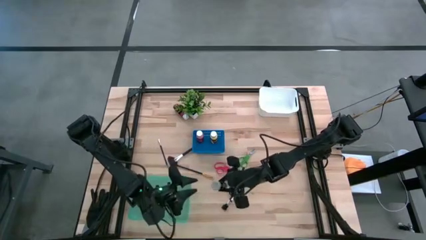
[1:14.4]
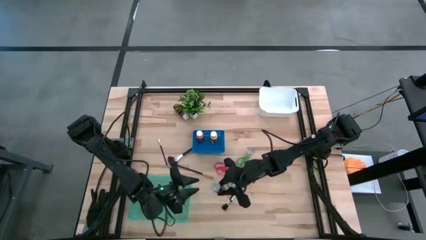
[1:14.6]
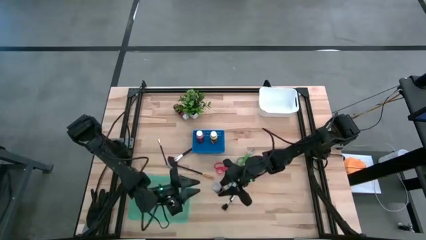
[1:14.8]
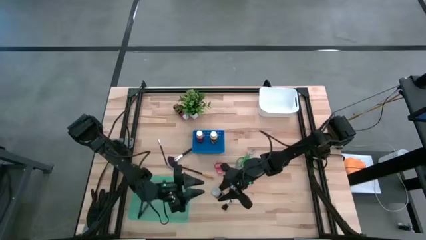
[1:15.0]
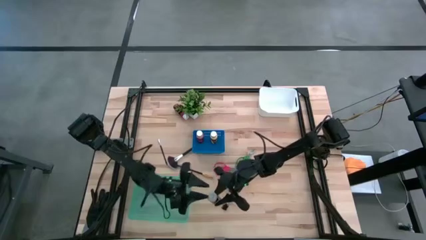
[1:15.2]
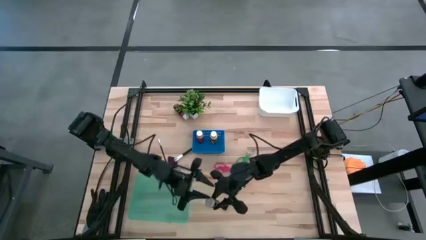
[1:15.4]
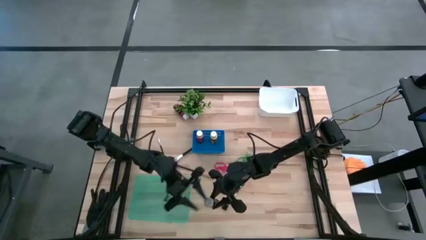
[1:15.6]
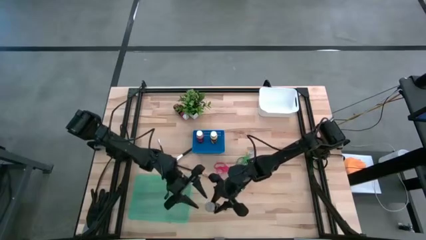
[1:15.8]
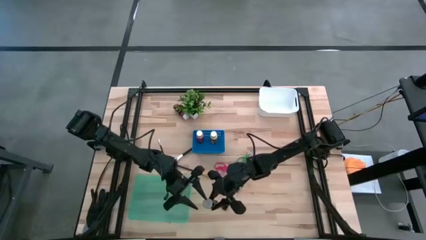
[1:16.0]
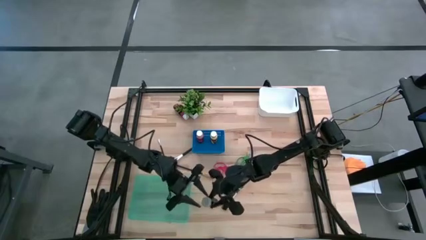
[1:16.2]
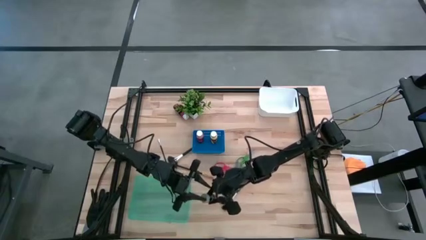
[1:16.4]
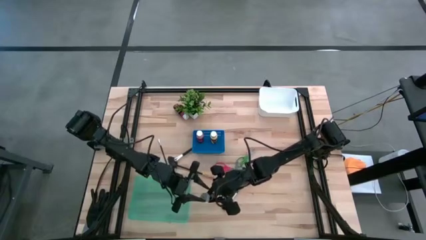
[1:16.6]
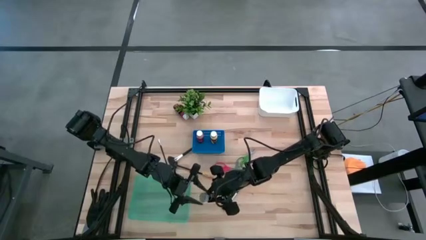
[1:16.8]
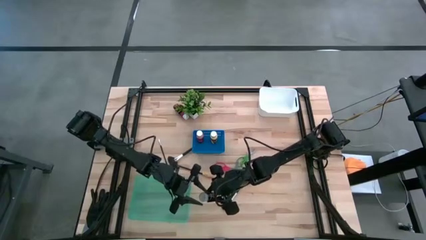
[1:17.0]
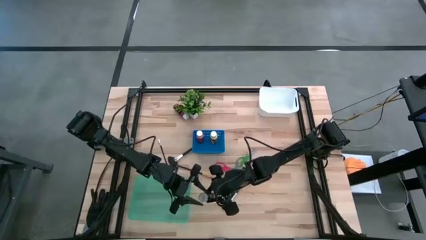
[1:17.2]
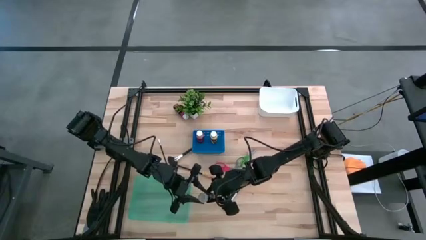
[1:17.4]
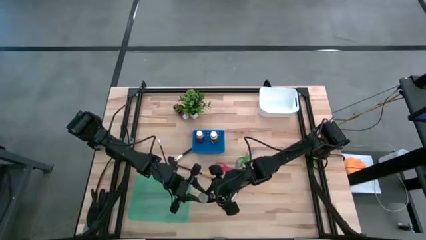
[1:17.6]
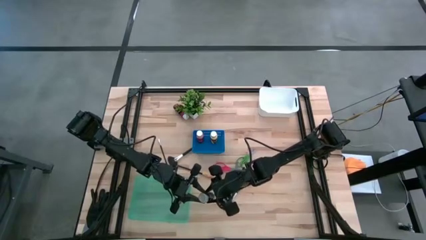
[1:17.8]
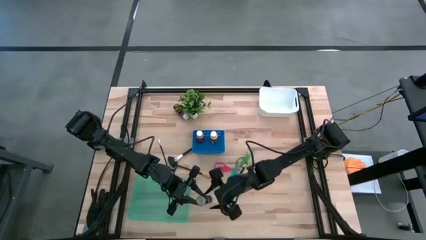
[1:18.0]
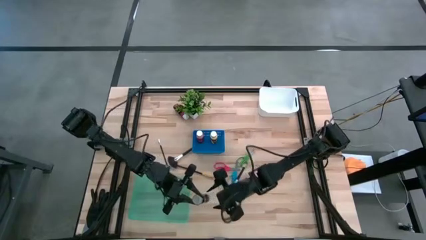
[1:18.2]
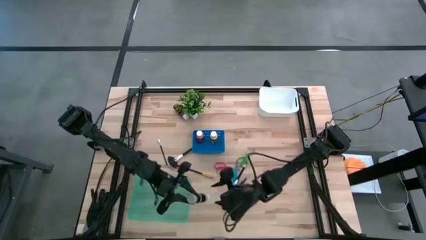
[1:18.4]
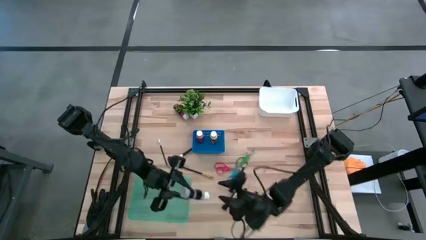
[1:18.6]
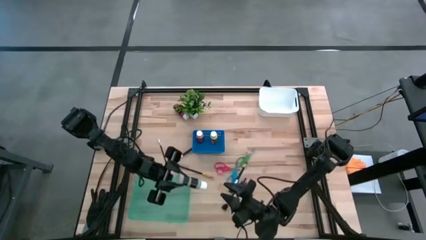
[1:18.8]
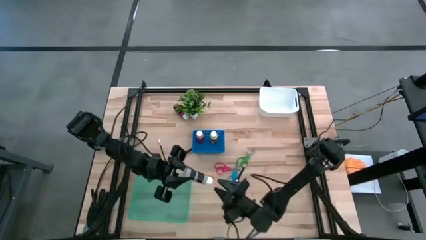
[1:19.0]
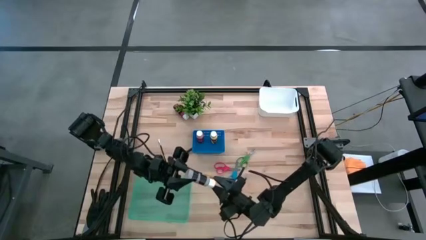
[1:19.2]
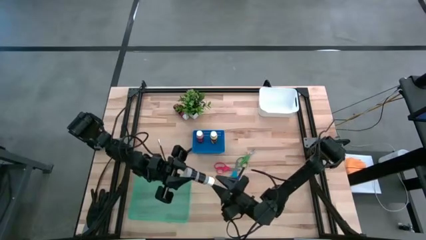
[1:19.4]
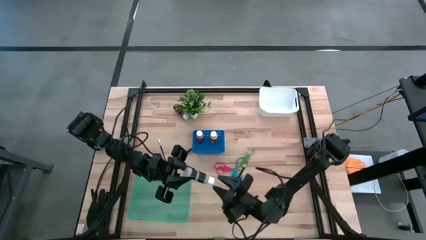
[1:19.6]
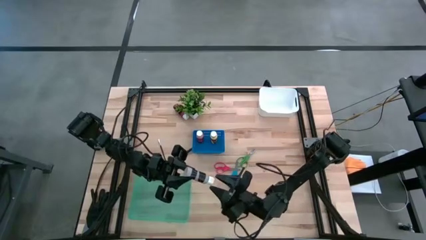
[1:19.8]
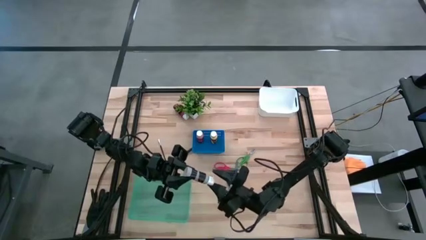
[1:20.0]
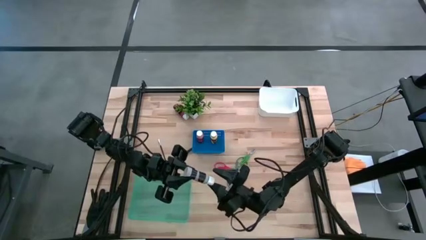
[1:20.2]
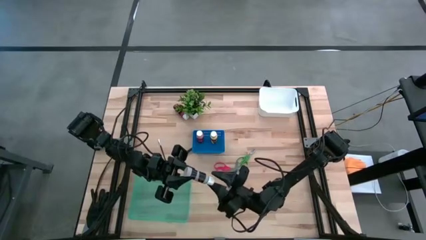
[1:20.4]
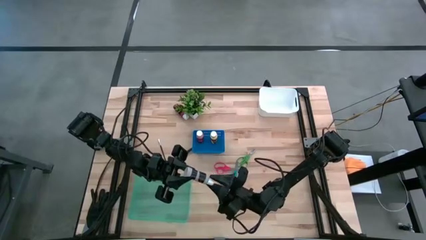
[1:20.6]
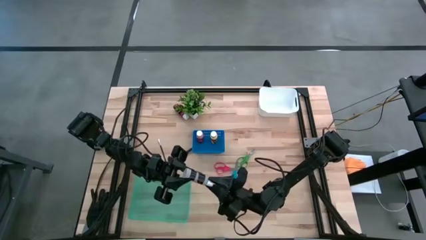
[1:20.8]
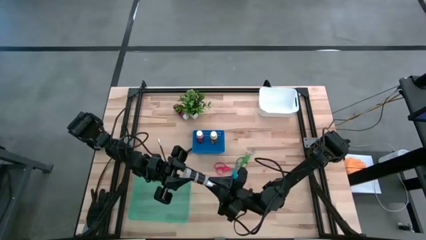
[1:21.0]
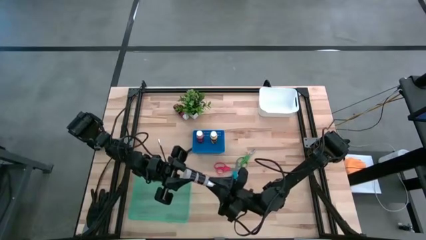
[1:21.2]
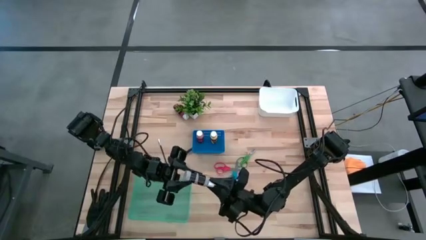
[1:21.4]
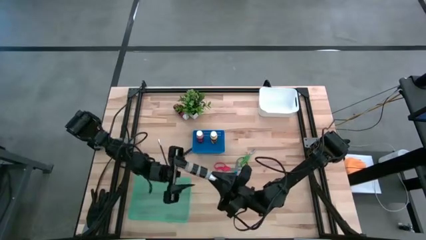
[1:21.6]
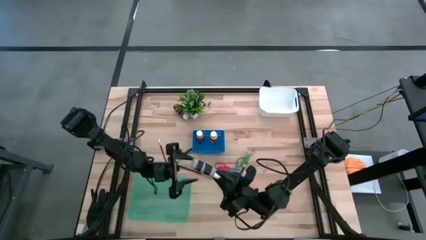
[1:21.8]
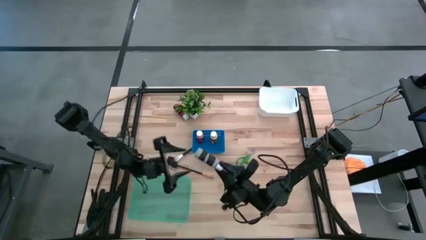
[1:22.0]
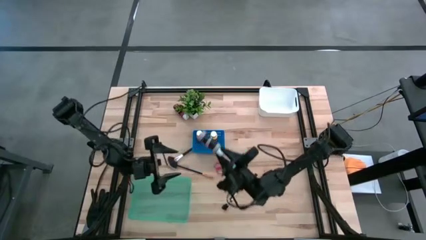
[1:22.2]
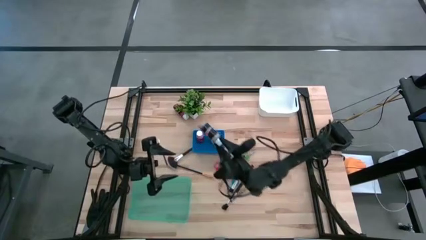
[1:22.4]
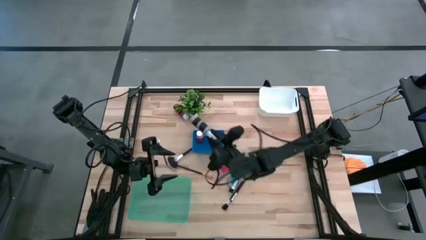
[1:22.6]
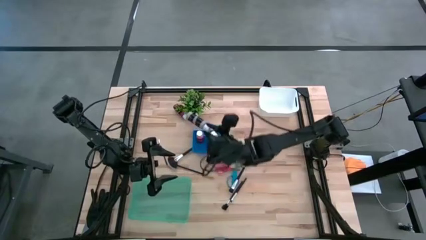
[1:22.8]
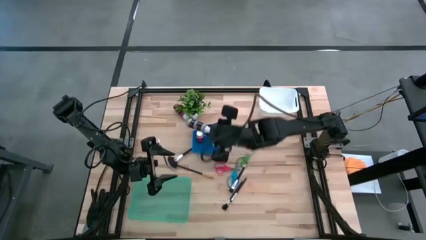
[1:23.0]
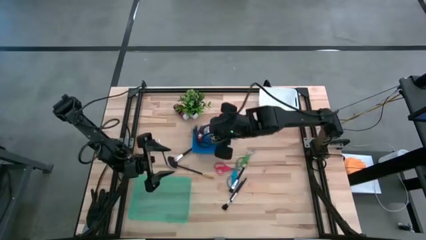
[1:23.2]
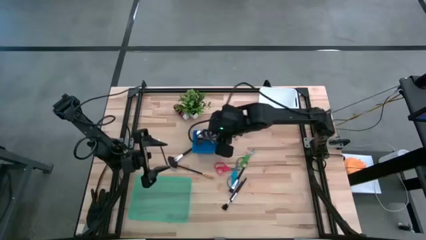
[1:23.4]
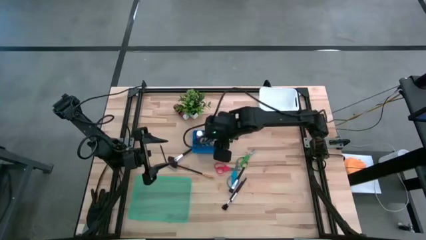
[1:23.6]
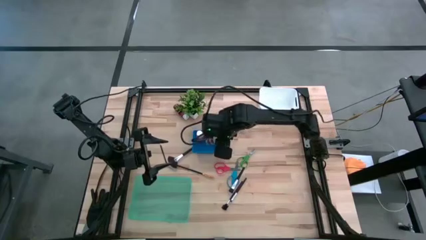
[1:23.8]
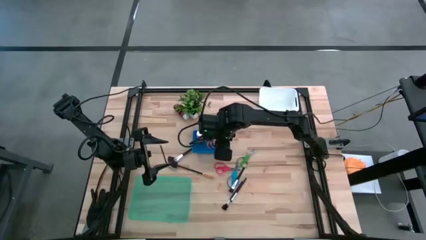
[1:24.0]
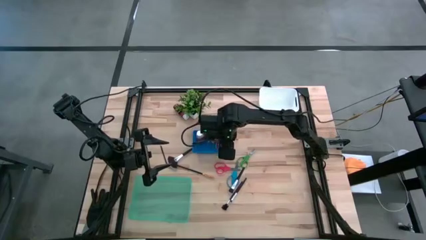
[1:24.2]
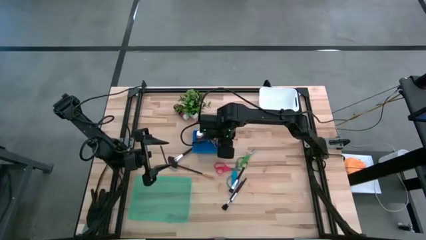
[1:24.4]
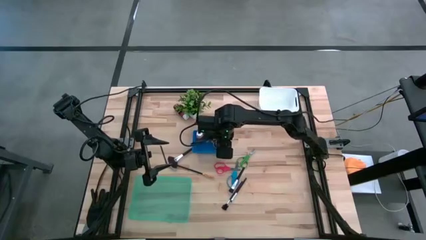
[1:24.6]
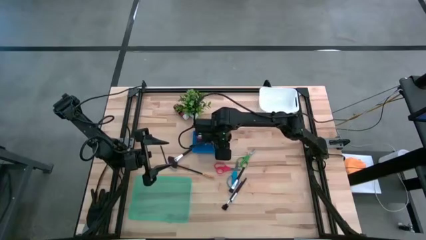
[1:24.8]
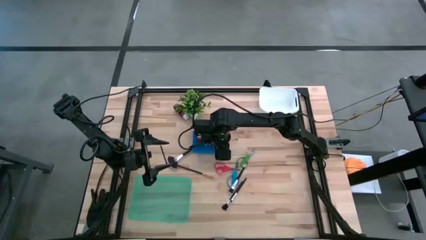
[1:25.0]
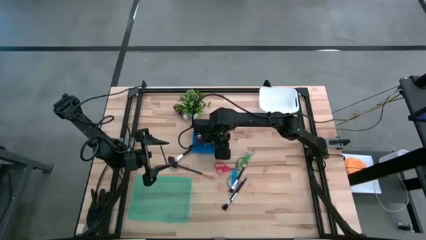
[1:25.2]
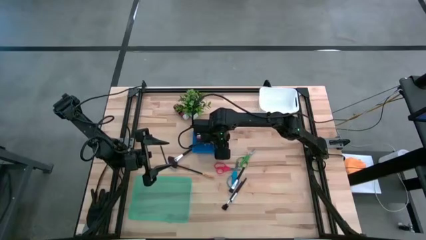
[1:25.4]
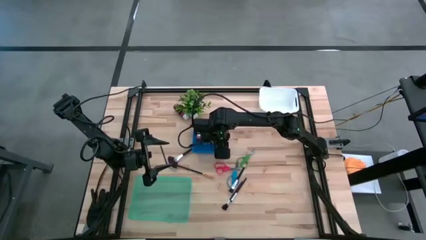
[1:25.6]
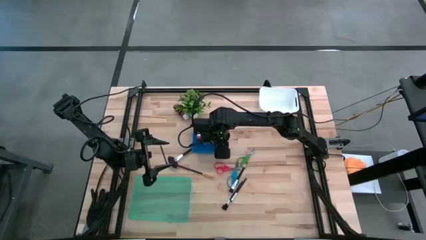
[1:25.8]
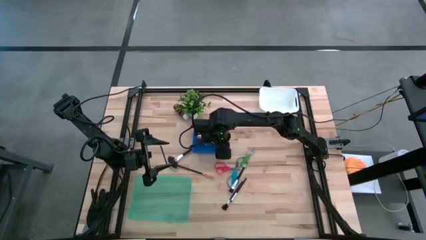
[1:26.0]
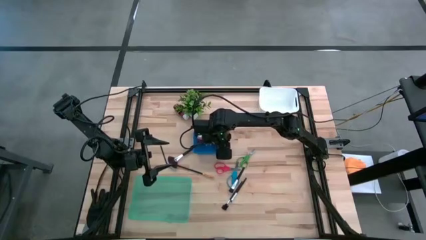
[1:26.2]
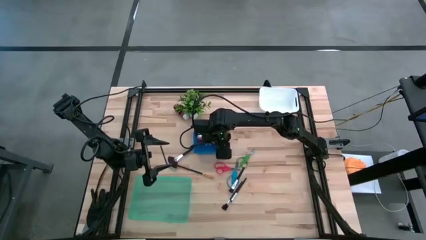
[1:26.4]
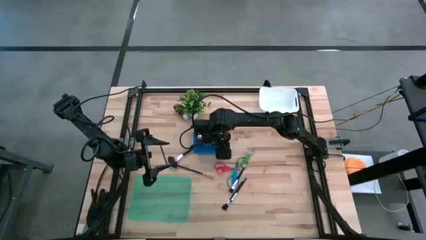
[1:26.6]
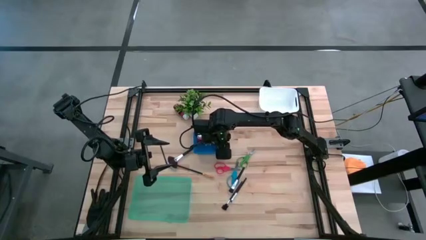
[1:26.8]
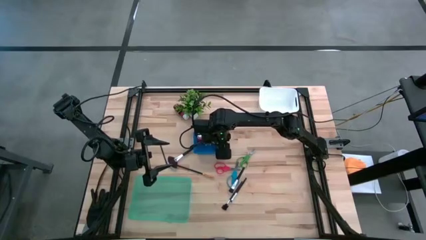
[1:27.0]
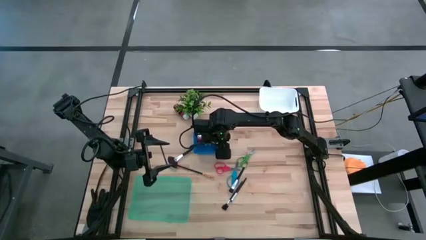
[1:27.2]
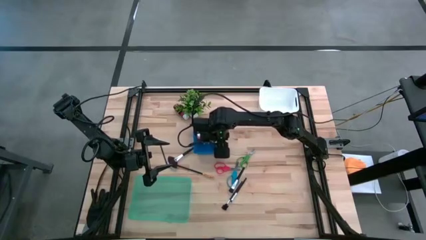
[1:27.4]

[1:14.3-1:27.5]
Task: Pick & Place Paint Supplies
Put the grey paint into the blue bin
